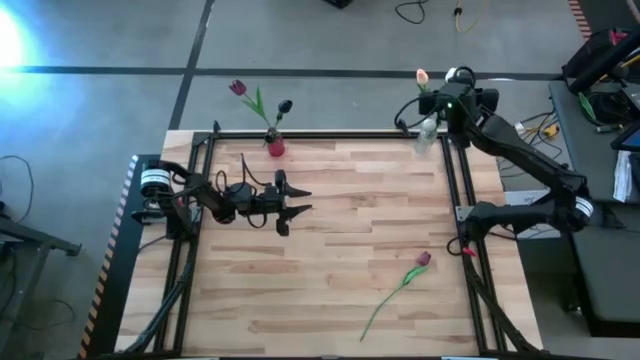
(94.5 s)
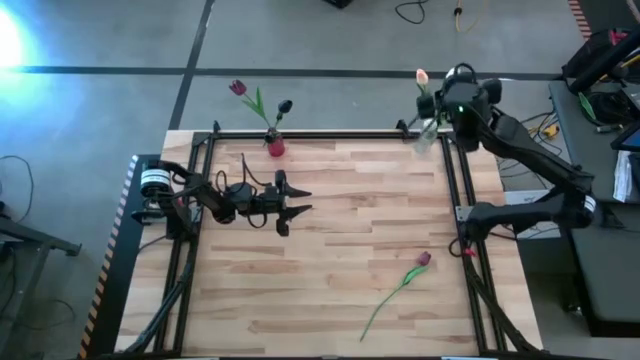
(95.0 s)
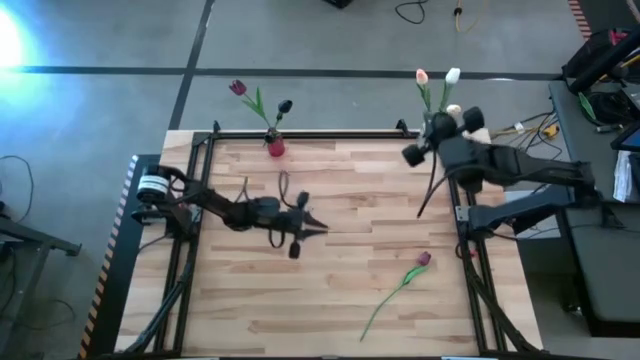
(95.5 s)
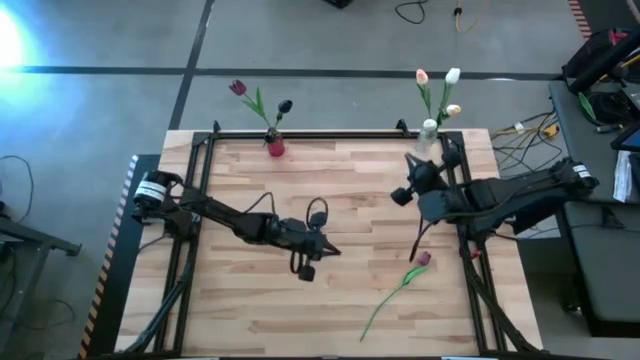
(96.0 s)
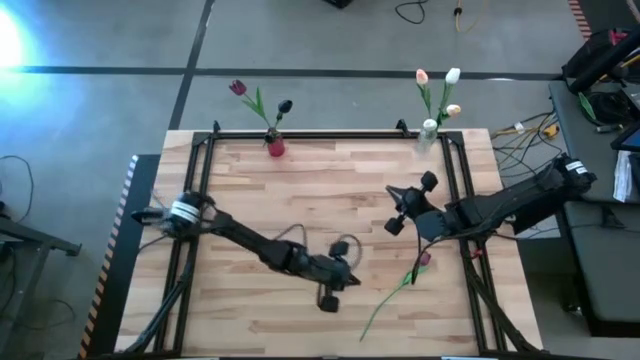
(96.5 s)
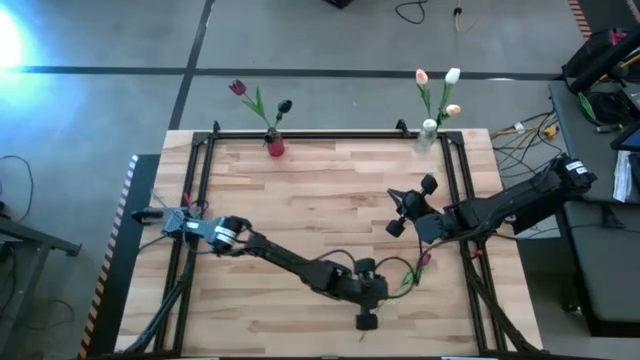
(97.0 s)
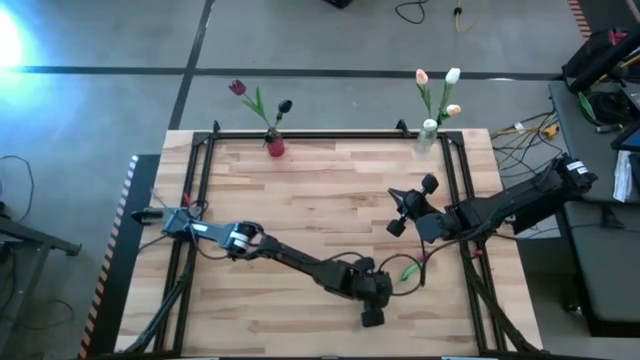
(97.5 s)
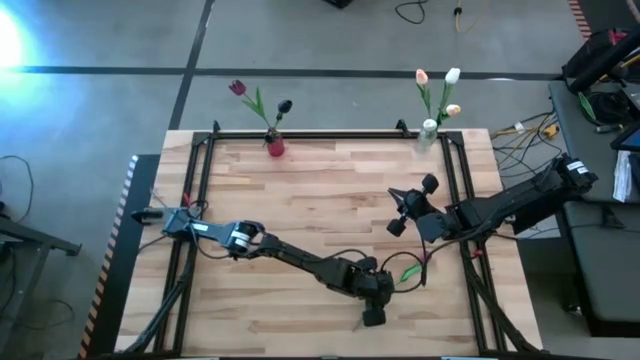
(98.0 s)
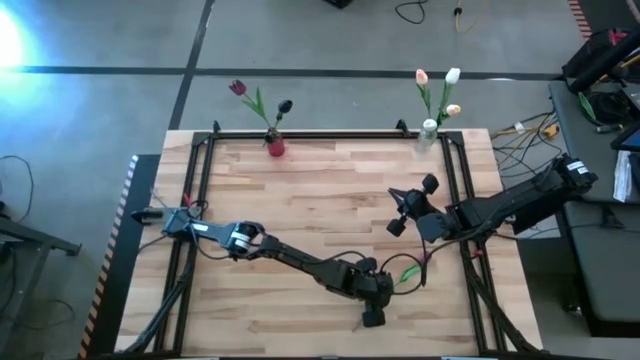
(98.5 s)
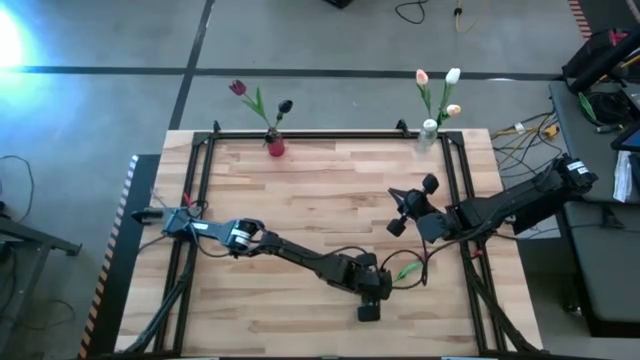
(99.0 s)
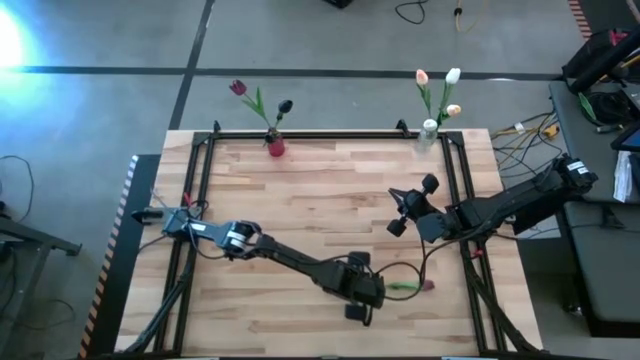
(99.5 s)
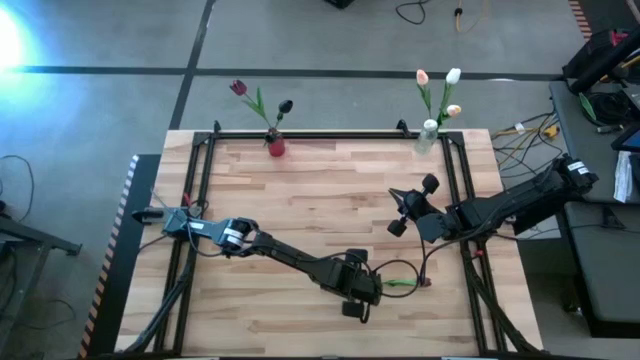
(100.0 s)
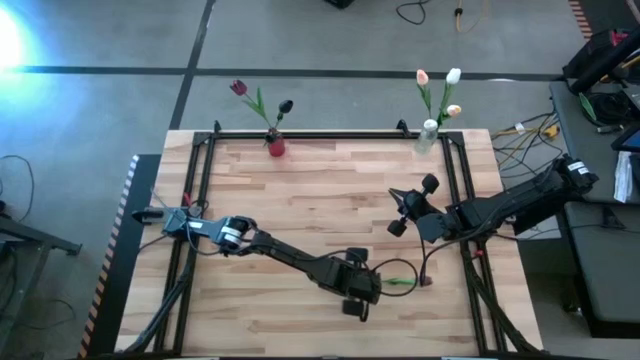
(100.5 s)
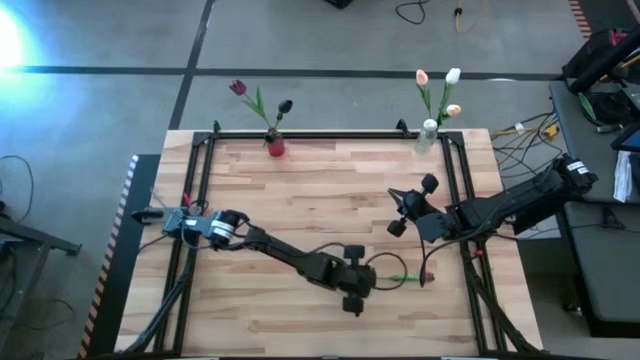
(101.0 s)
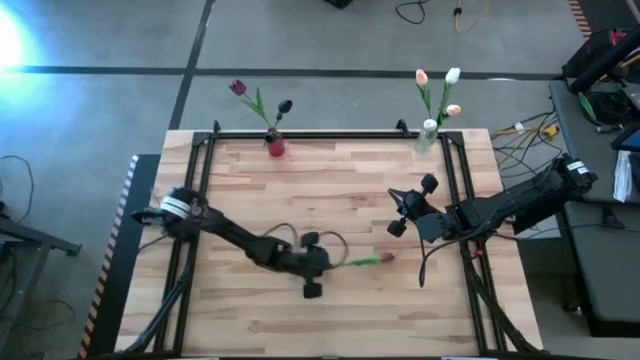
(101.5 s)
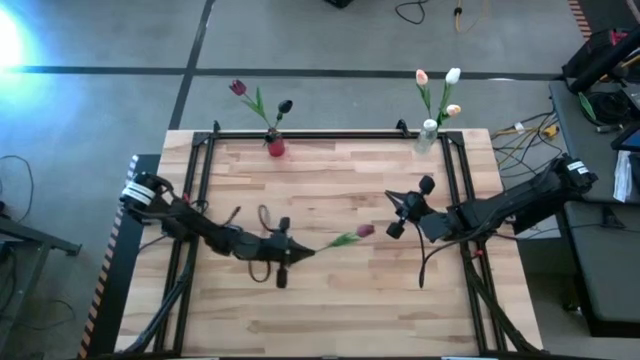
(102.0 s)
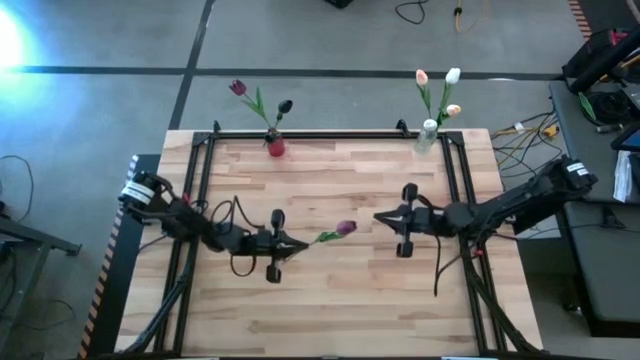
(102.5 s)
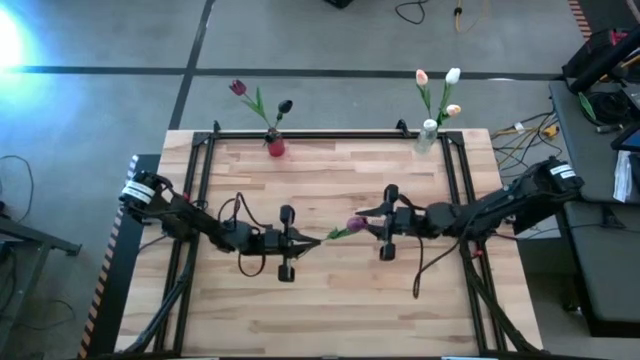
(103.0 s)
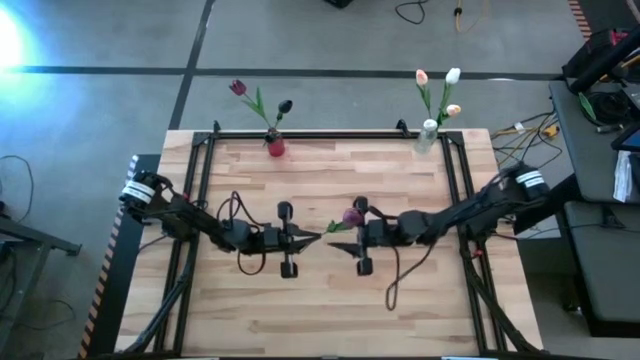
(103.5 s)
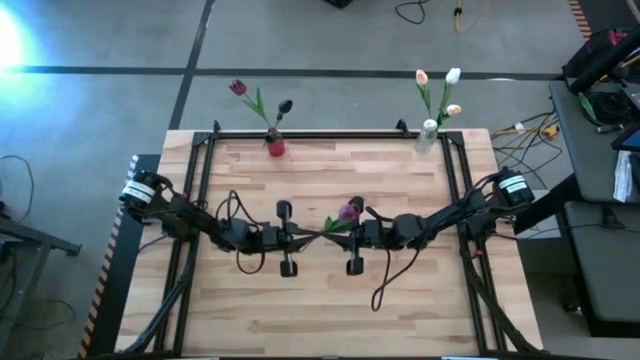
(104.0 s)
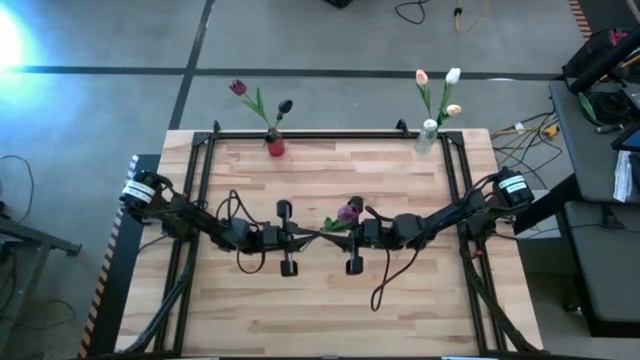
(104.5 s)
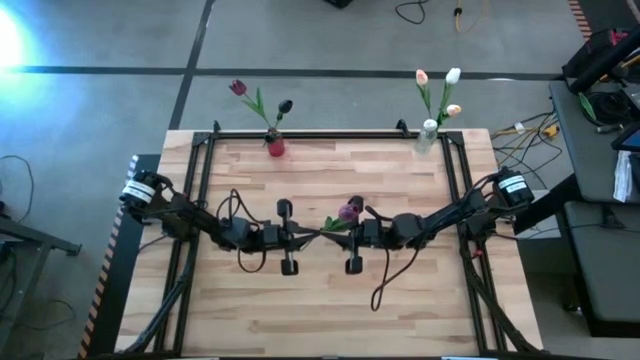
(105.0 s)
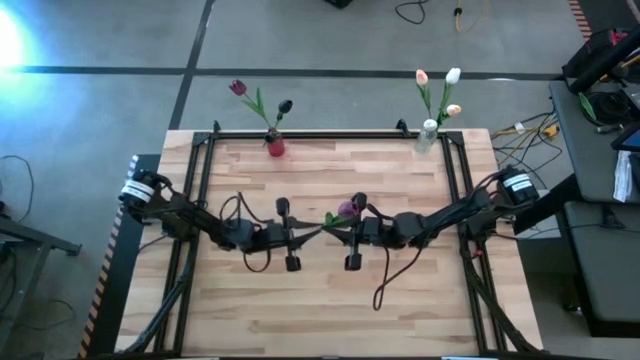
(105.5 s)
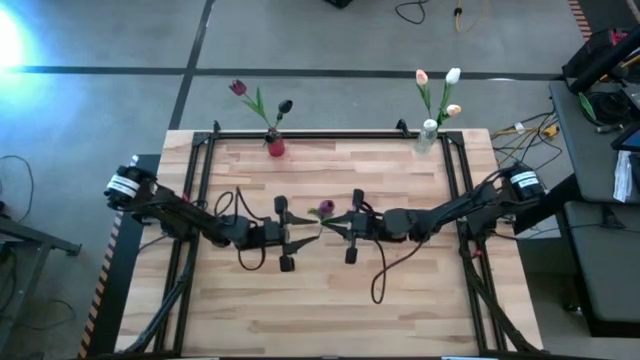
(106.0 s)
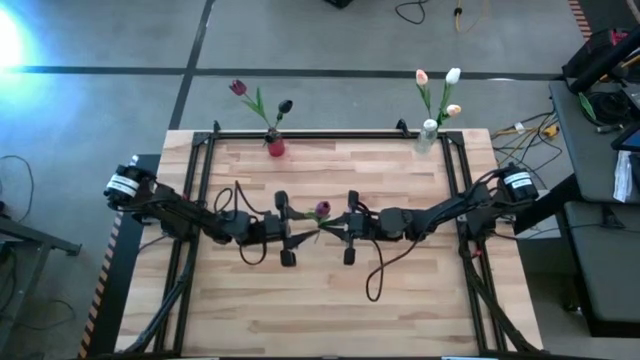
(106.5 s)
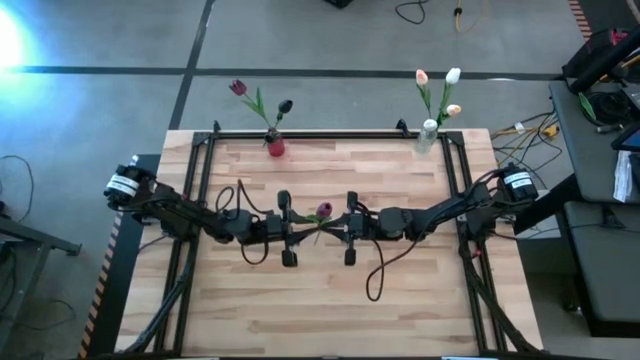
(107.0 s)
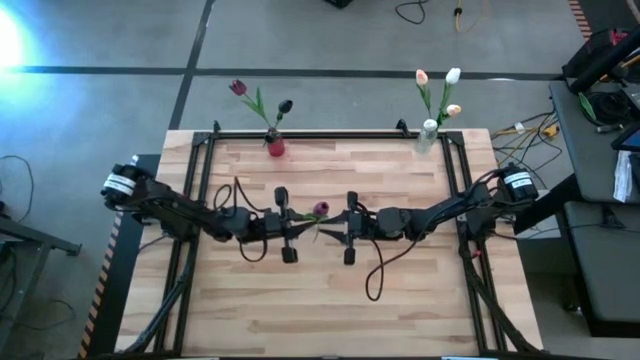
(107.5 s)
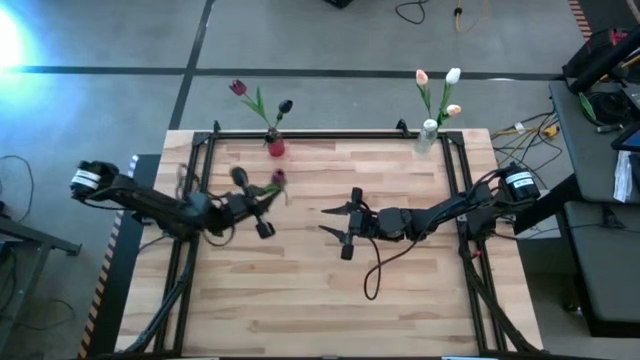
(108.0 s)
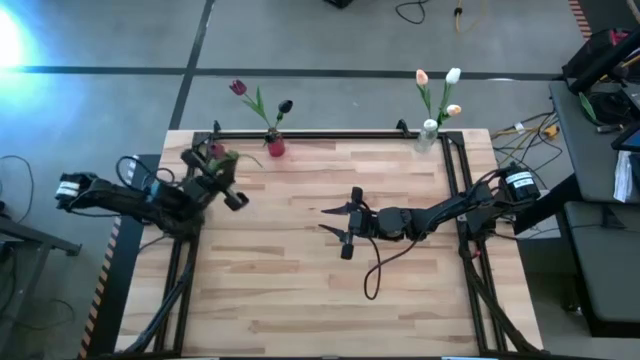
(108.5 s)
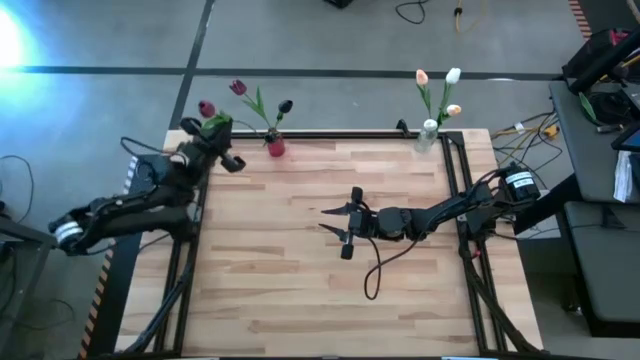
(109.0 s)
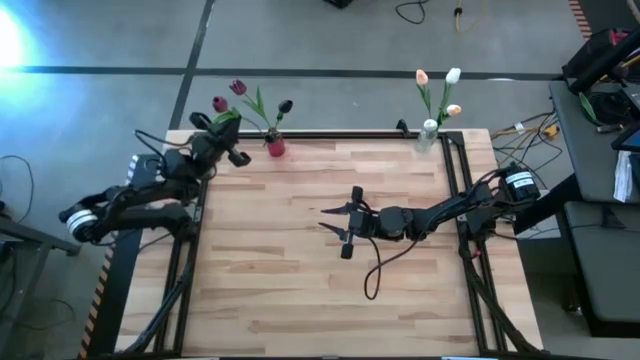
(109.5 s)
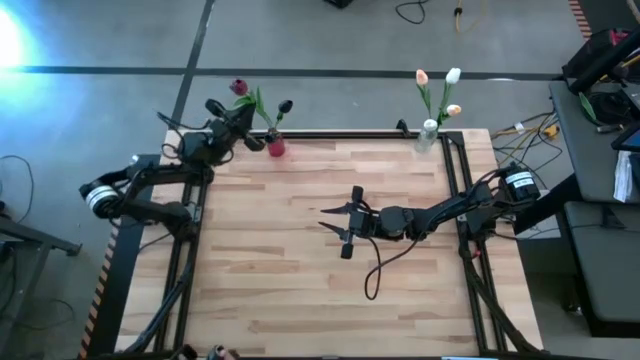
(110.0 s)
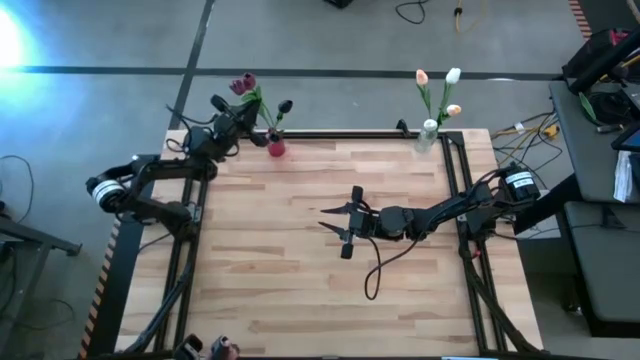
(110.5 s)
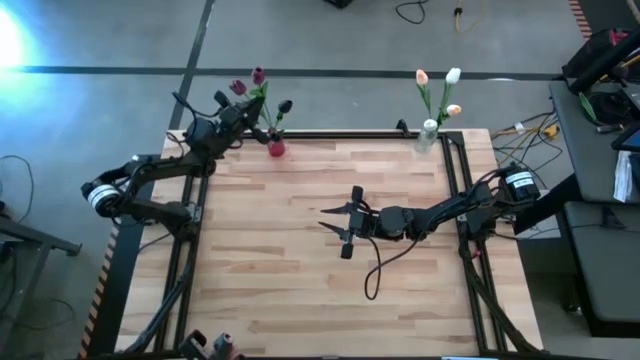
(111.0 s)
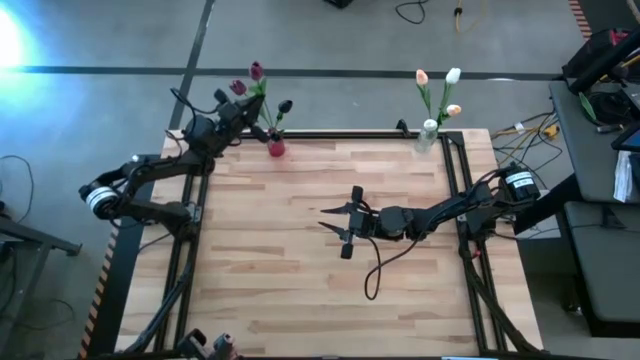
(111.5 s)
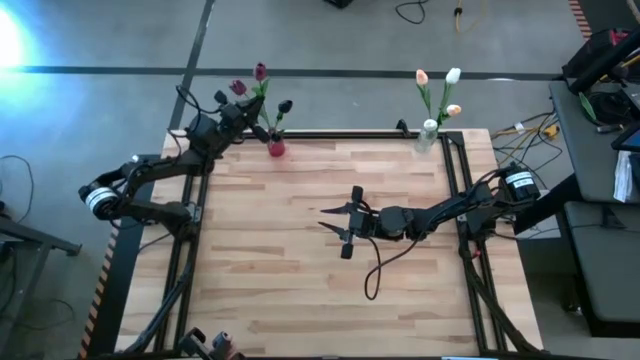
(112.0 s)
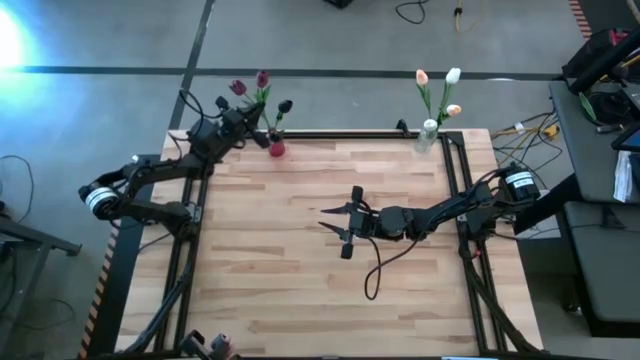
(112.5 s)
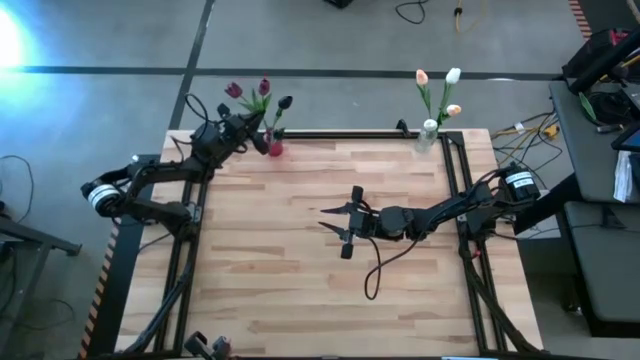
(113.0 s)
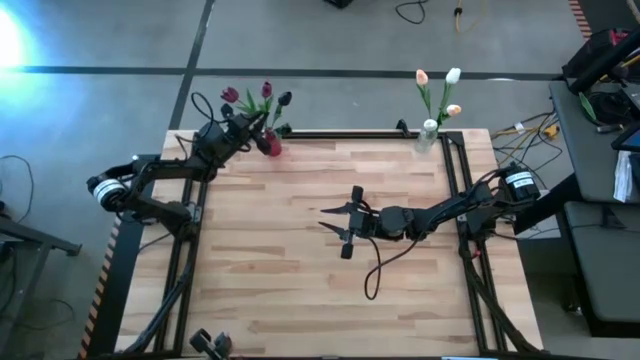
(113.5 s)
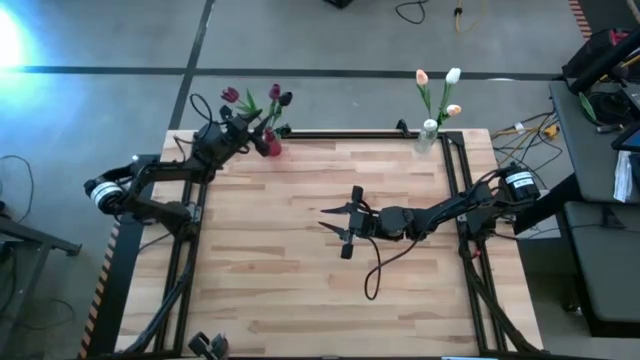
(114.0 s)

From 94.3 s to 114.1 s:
Task: Sort flowers into vase by color
Put the red tulip into the red vase

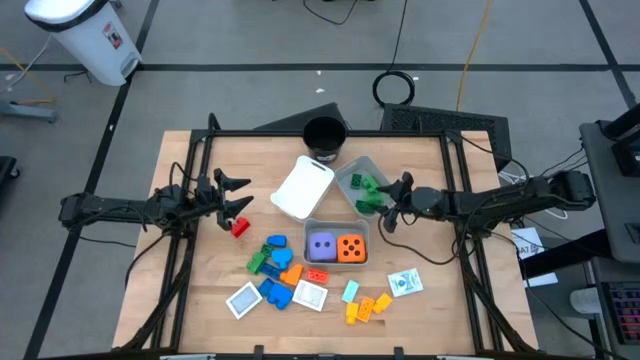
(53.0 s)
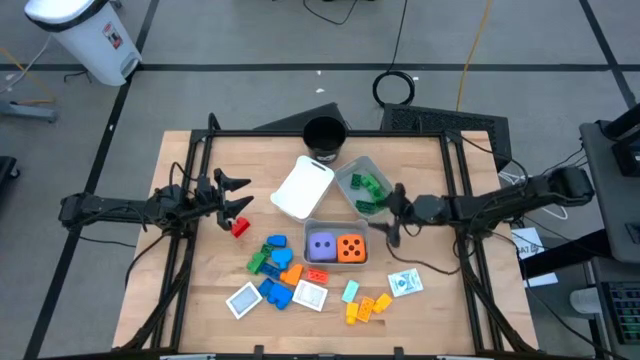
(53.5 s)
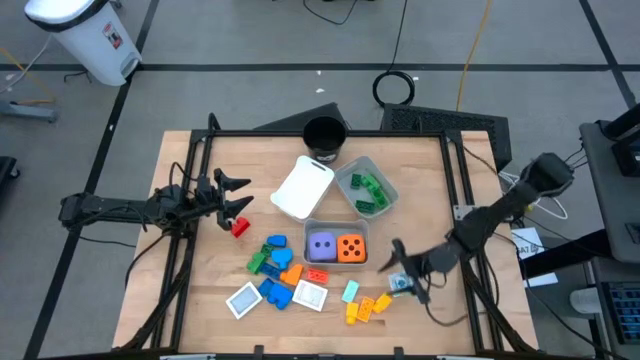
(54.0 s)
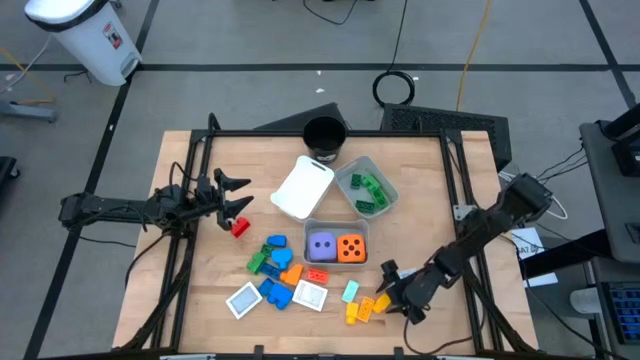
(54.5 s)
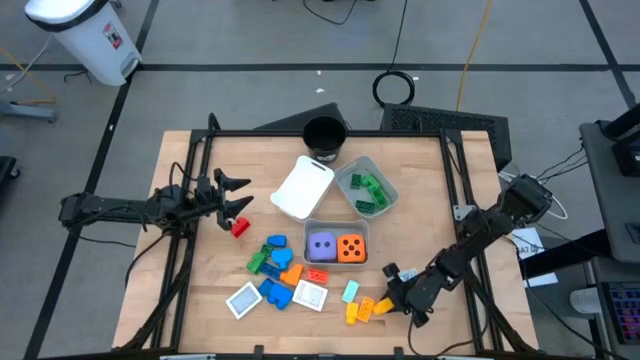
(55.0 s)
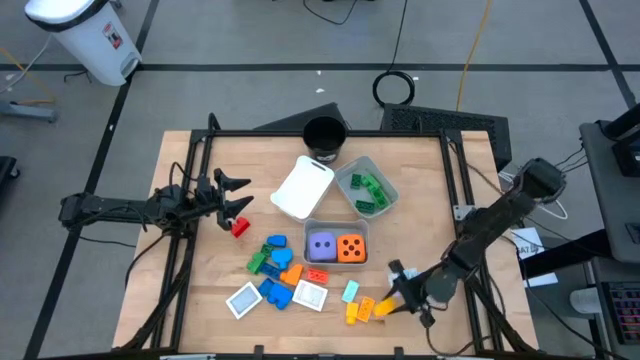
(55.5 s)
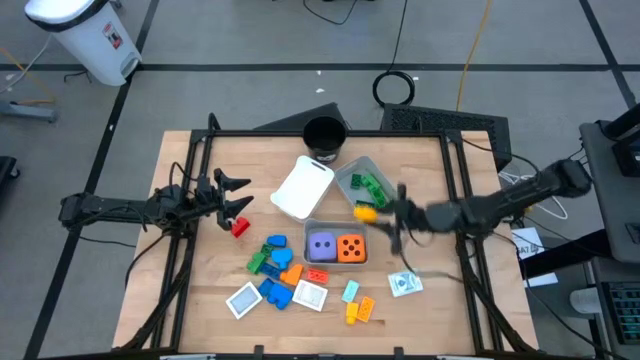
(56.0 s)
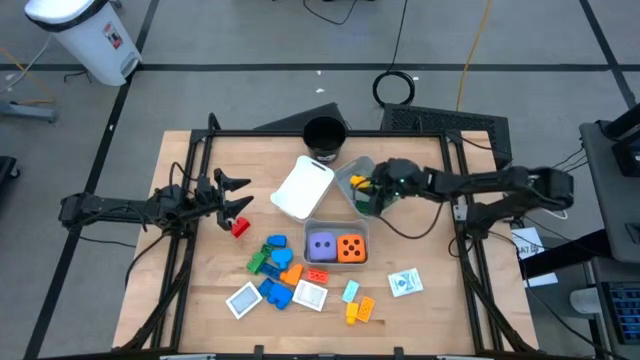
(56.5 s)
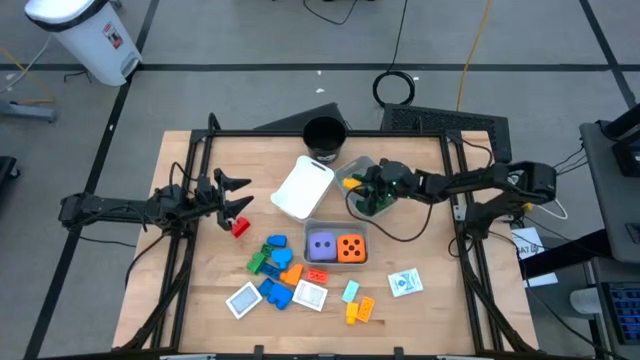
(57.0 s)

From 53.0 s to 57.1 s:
Task: Pick & Place Toys
Put the yellow game piece into the top gray bin
